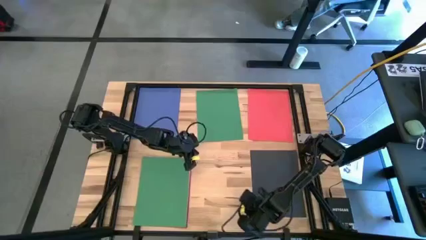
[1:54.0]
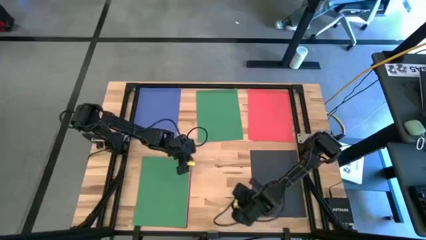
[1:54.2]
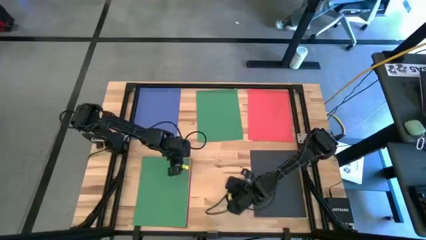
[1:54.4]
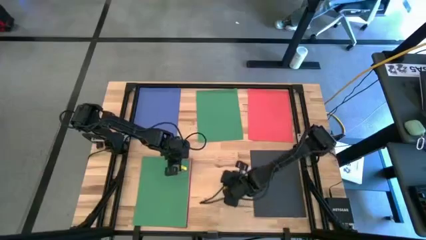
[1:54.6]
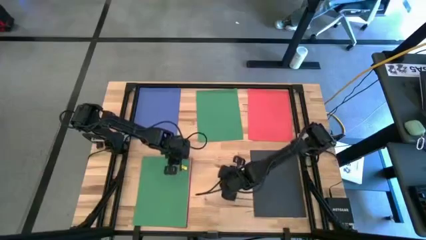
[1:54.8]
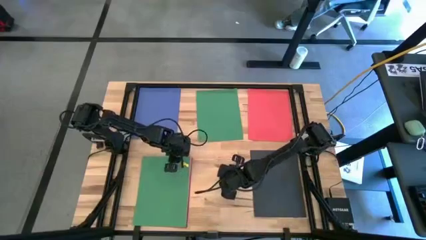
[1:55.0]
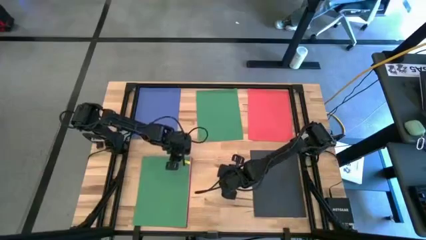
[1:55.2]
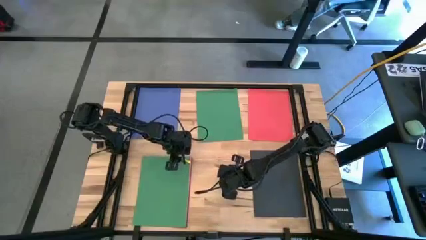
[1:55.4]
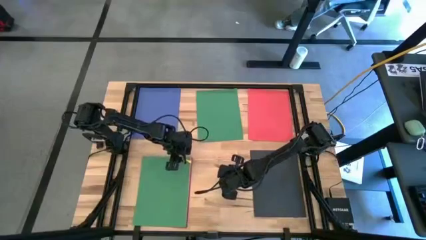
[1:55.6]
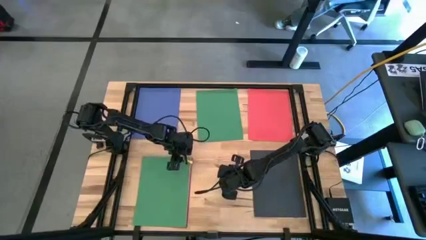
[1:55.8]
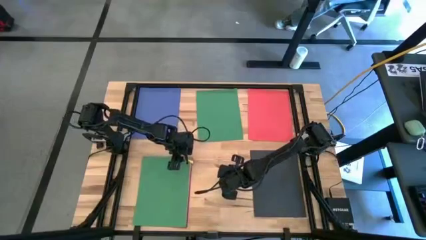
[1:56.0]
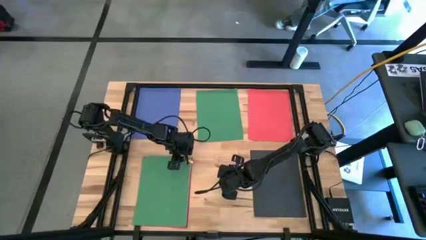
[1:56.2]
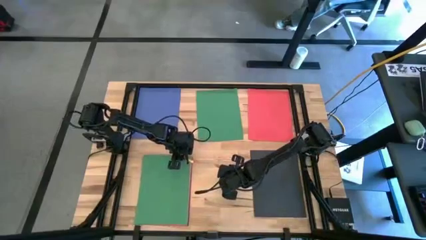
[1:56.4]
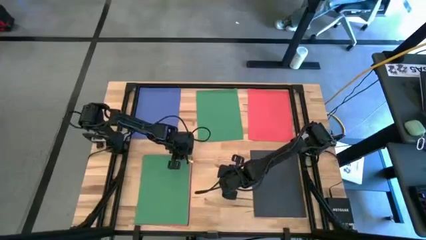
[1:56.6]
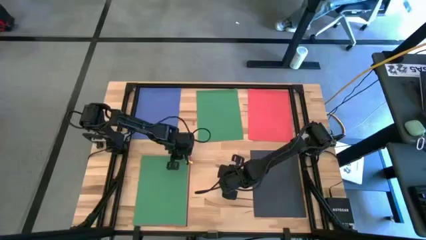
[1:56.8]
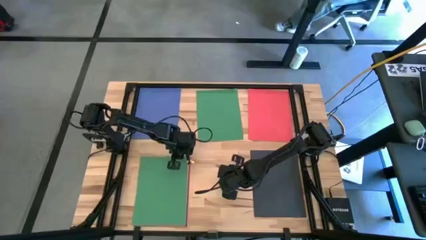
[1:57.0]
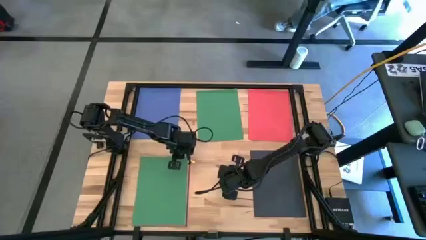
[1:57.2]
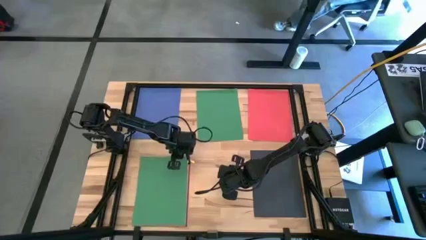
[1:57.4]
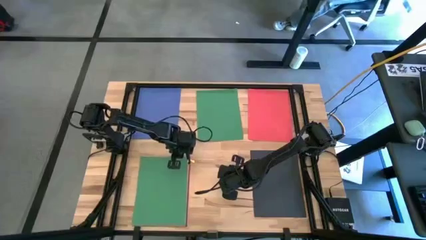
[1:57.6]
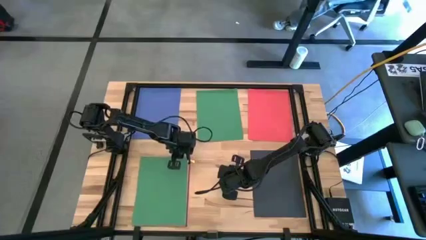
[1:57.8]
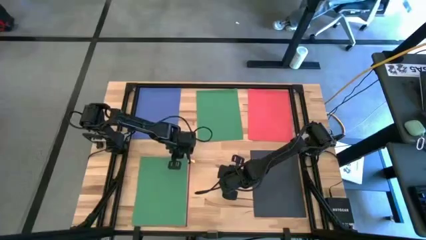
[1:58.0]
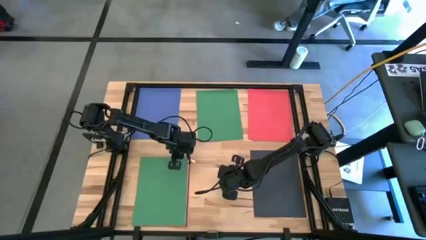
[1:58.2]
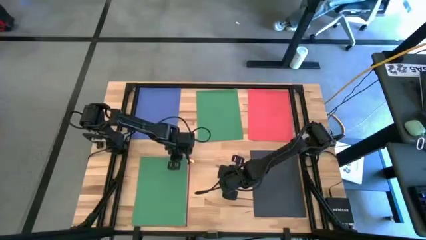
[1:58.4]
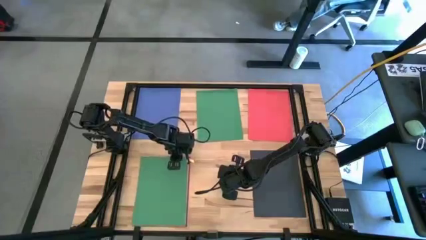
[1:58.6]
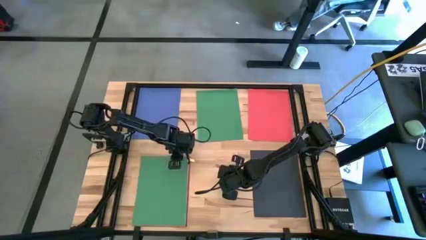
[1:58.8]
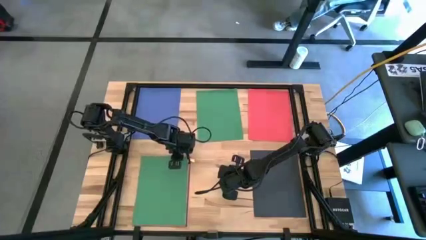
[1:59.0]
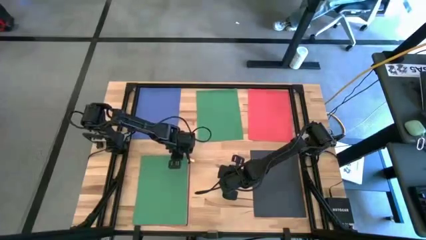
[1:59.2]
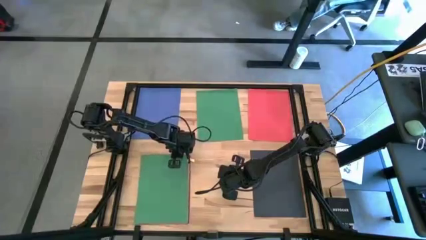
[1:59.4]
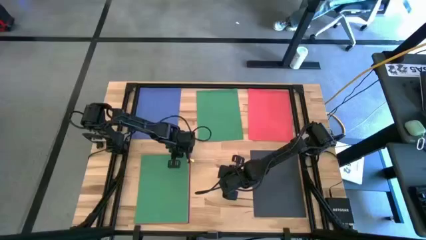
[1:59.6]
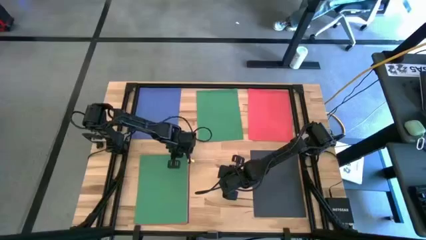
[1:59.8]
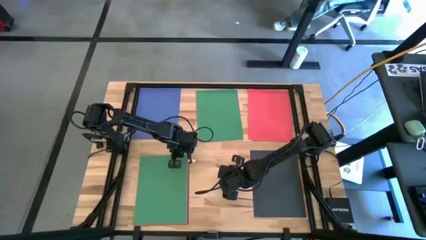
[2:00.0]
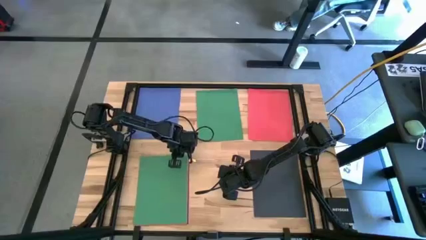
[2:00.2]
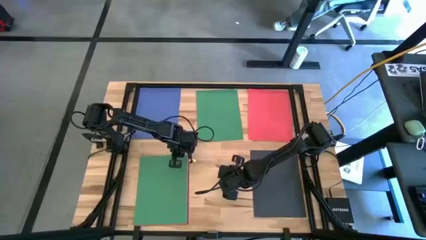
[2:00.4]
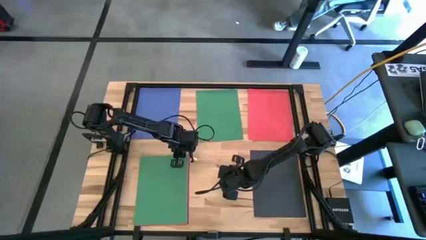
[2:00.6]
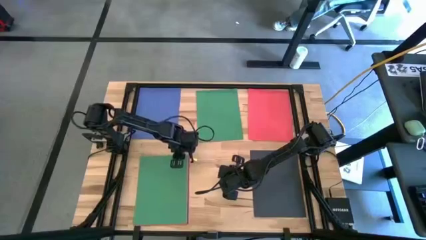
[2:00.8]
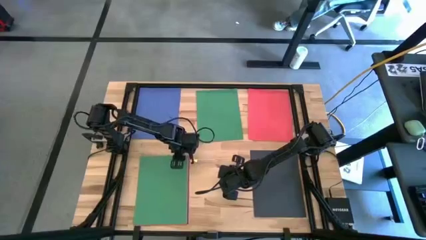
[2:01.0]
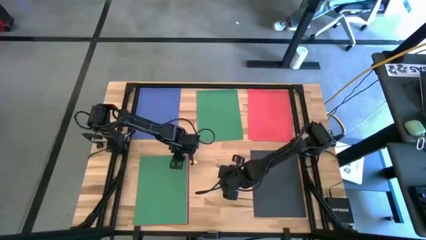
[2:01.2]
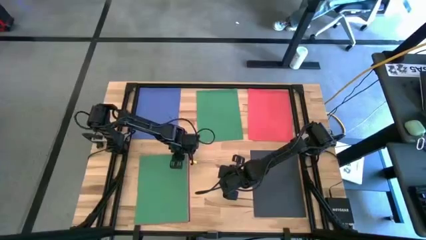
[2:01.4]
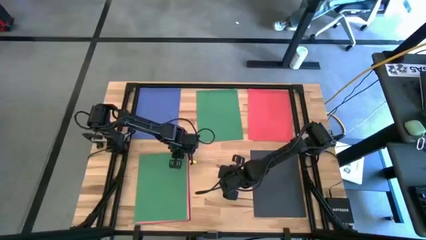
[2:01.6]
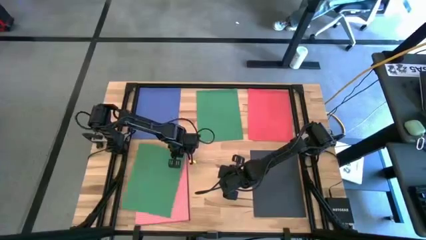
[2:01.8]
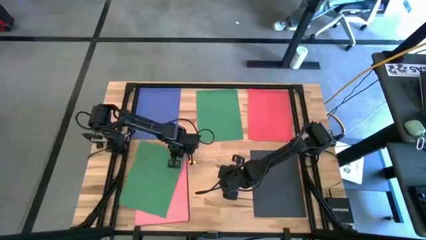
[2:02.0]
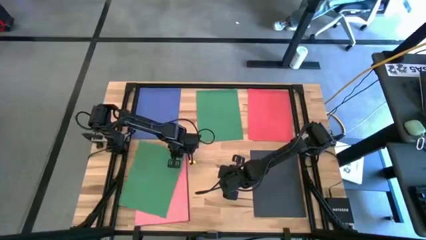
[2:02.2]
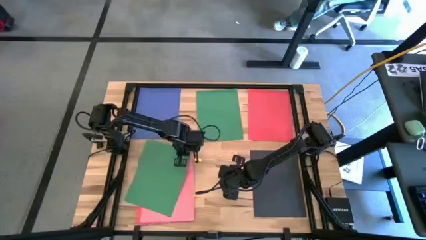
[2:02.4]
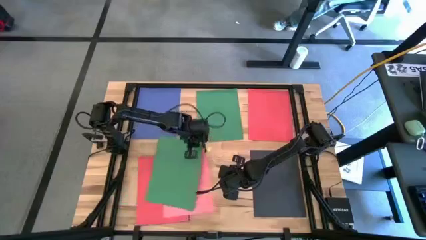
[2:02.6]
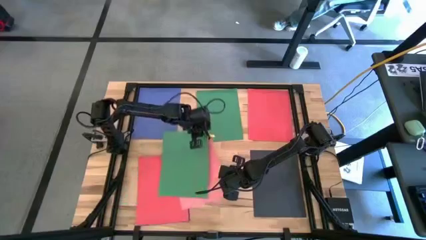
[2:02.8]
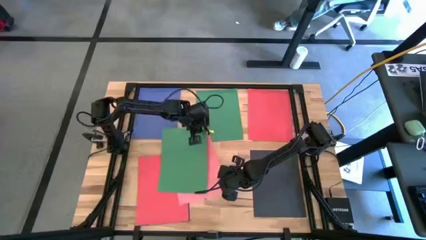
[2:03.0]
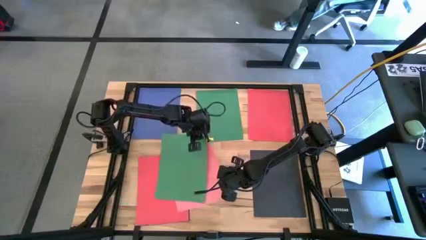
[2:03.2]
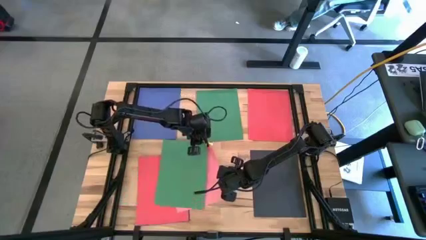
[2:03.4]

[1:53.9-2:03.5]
Task: Organize paper
Stack the green paper on top of the other green paper

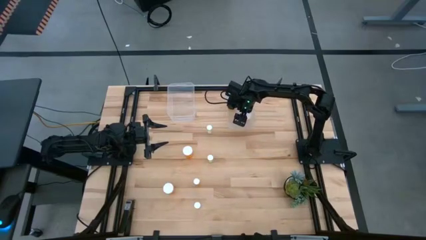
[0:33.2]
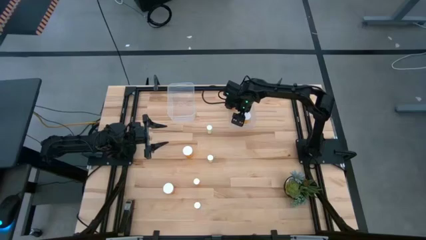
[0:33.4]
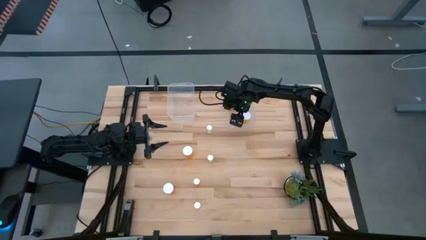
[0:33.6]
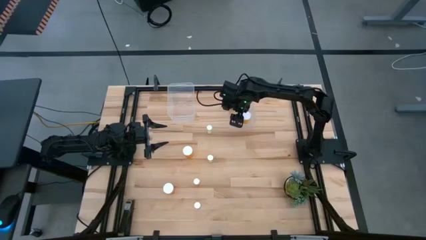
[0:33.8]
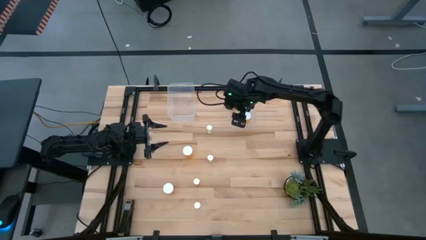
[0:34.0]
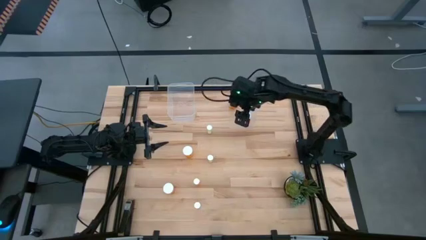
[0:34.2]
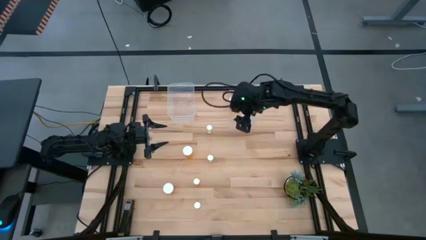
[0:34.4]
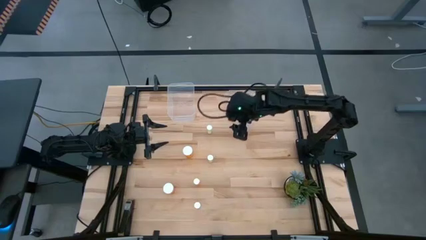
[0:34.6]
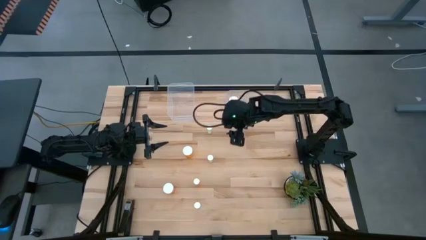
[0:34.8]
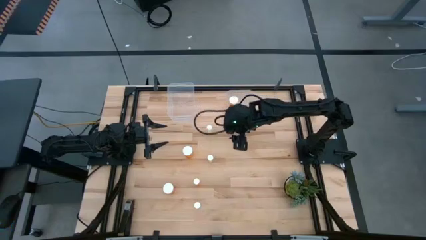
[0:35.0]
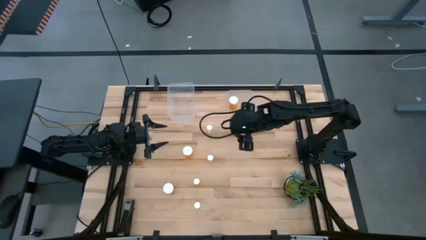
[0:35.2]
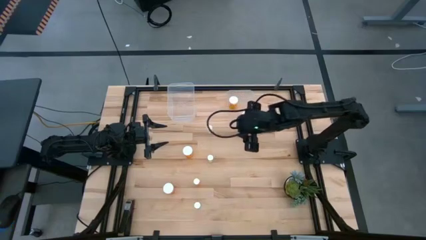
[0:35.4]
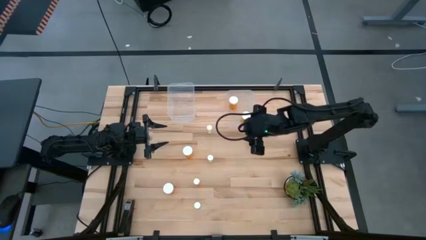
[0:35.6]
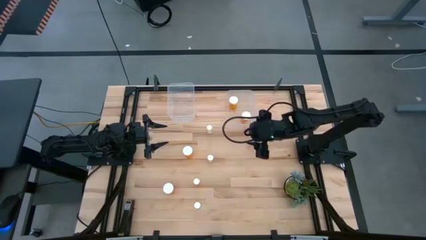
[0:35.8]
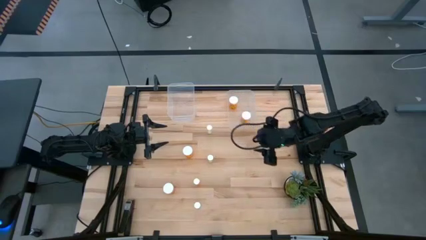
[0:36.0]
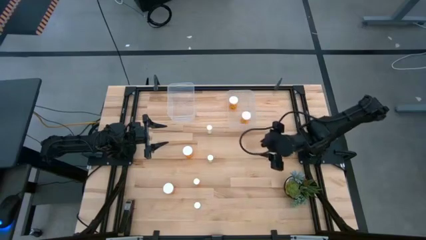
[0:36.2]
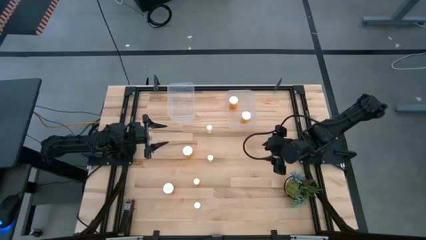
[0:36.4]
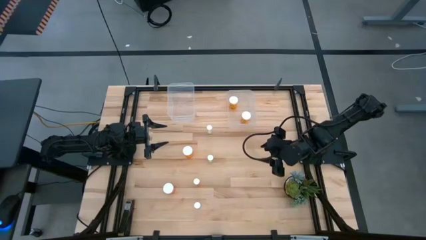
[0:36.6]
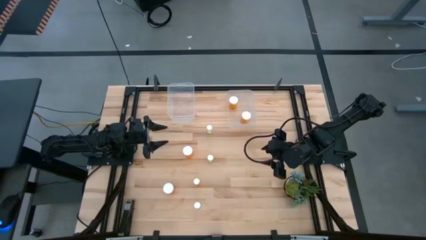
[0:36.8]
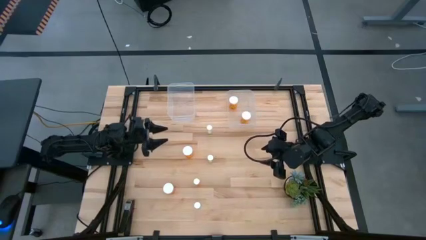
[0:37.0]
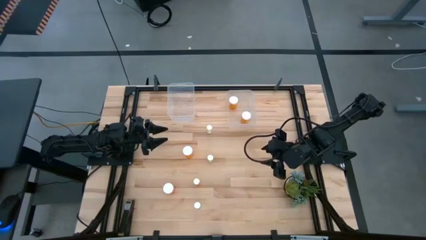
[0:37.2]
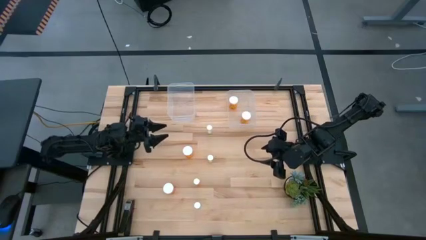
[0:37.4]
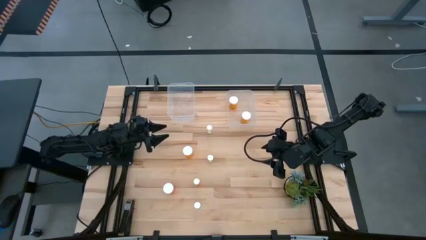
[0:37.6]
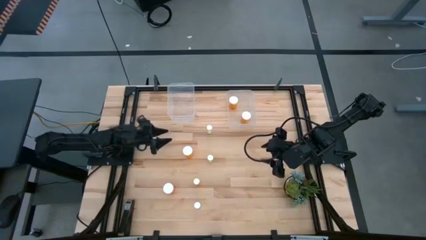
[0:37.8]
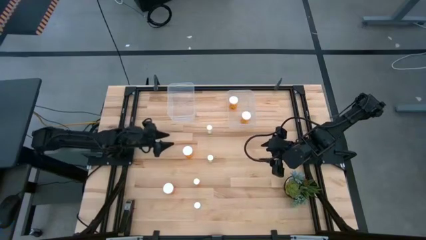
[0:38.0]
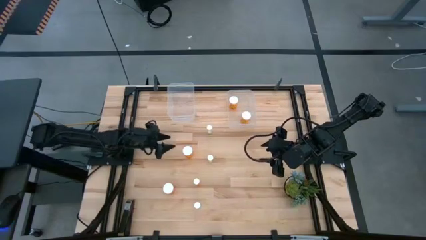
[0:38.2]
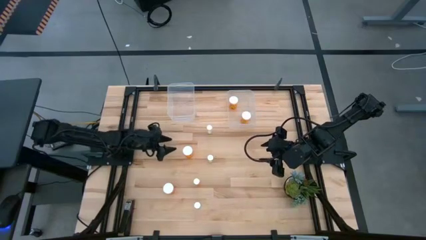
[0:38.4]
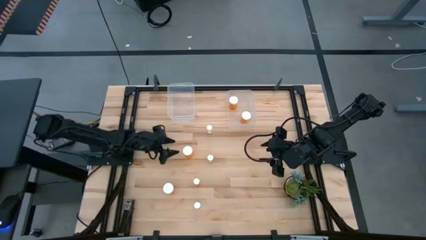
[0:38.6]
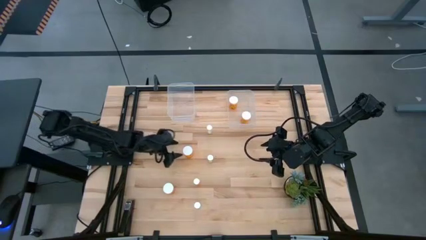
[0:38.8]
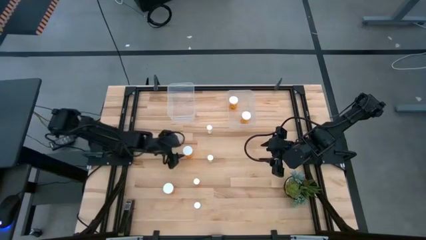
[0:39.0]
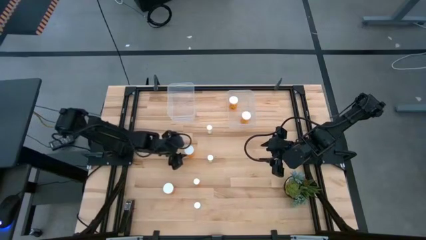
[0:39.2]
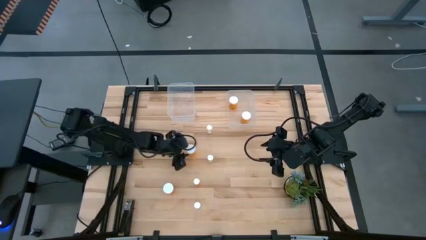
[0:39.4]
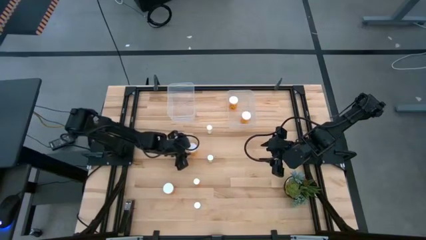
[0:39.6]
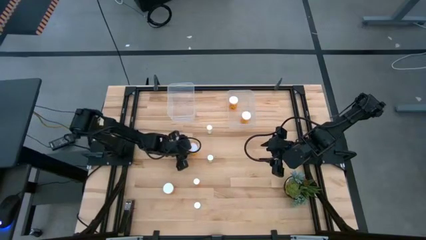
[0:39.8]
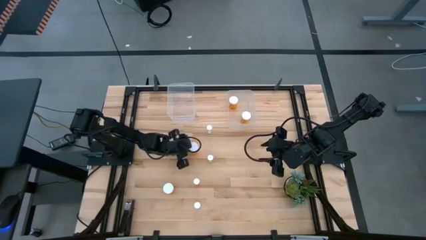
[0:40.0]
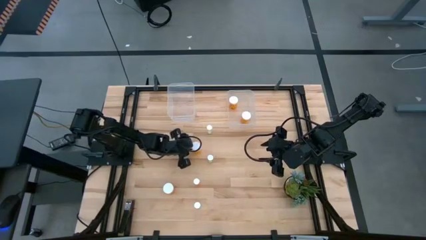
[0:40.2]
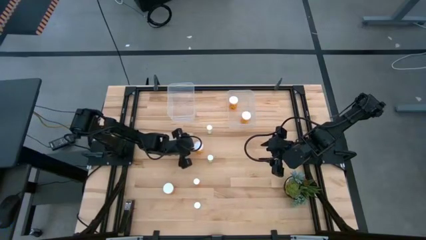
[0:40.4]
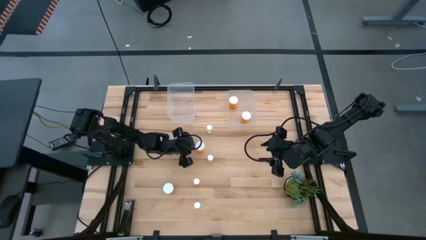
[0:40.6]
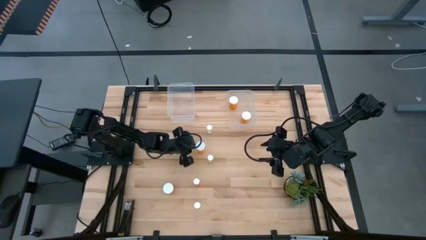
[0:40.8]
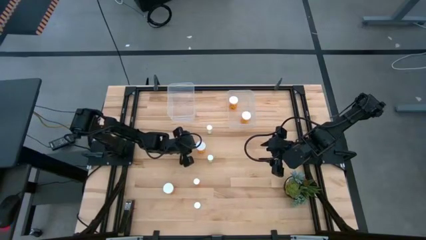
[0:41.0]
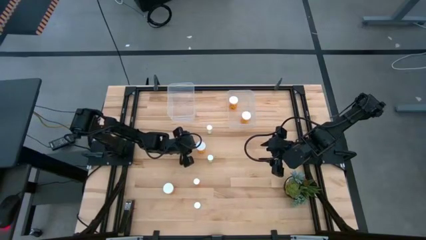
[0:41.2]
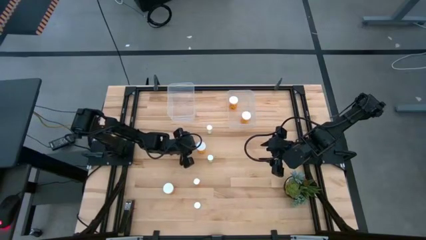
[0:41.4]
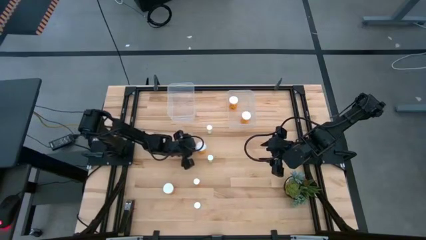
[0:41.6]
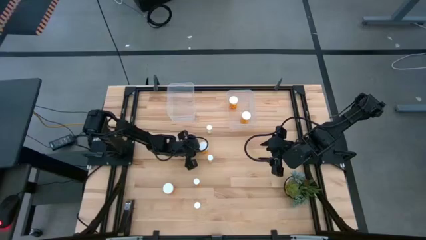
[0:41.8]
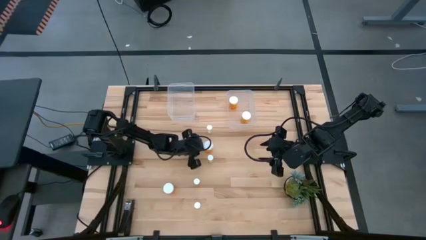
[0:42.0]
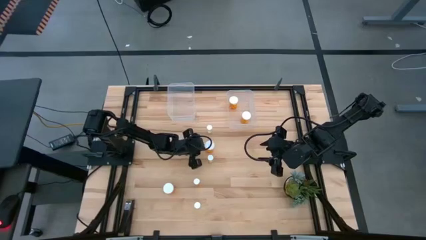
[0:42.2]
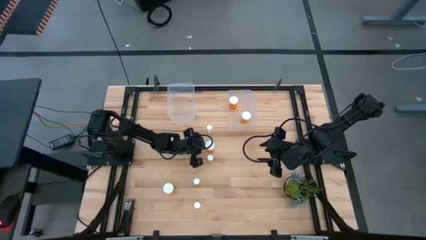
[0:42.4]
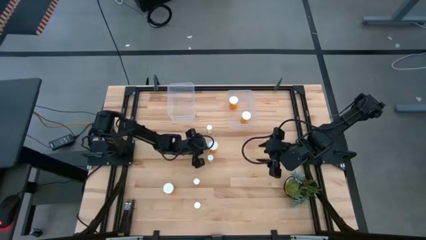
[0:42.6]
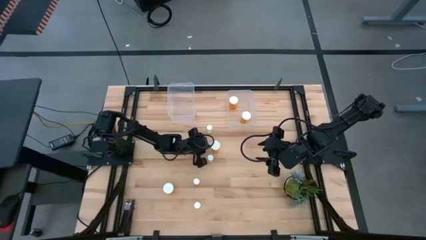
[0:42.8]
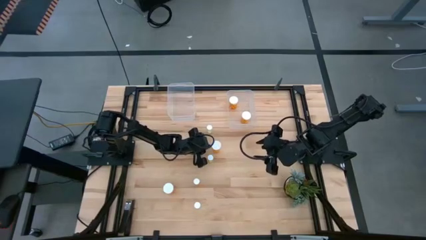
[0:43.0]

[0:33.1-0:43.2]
Task: Pick and place medicine bottles into bin by pill shape (circle, oval)
Put the large orange pill bottle into the right transparent bin
